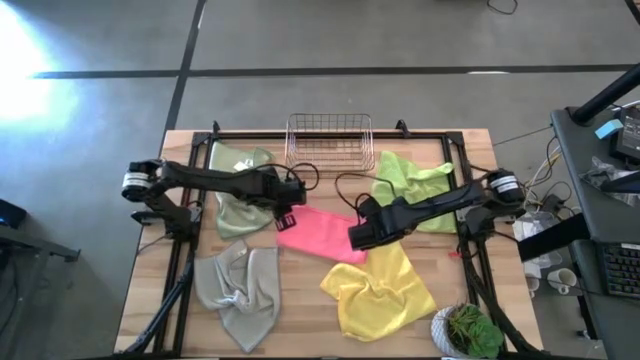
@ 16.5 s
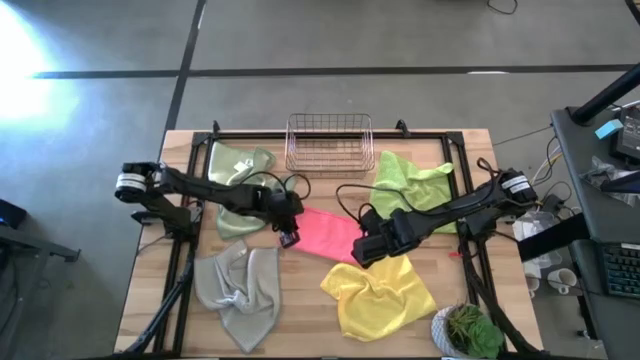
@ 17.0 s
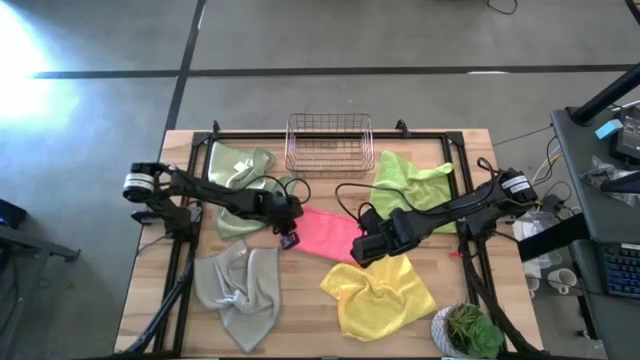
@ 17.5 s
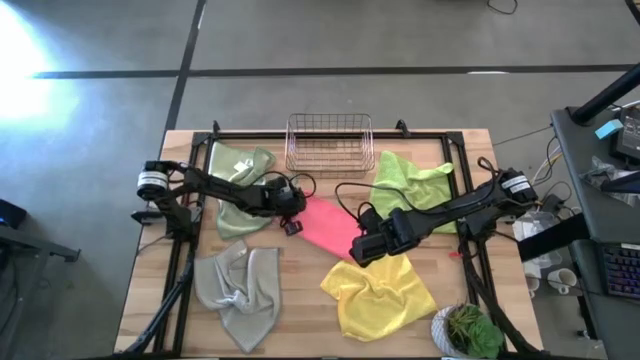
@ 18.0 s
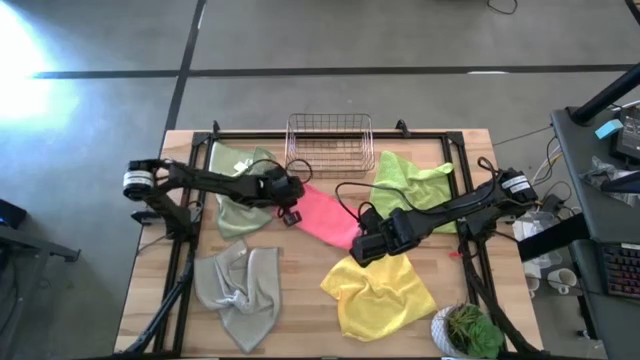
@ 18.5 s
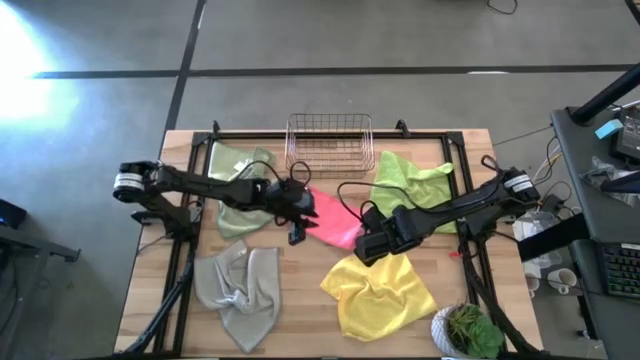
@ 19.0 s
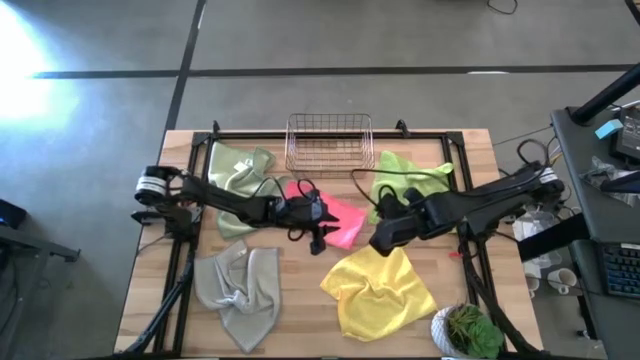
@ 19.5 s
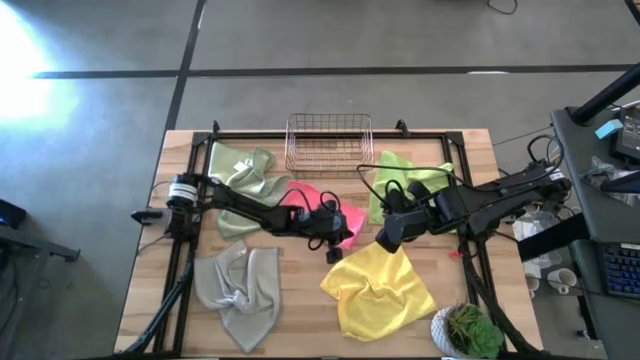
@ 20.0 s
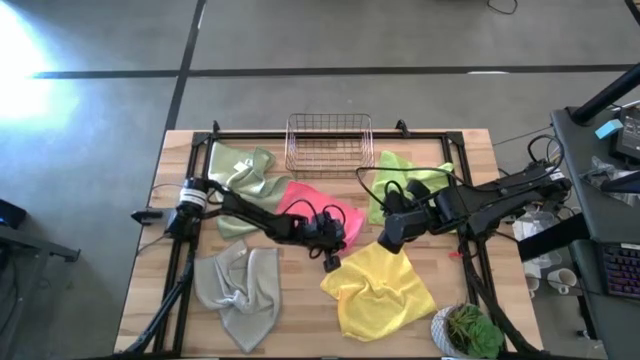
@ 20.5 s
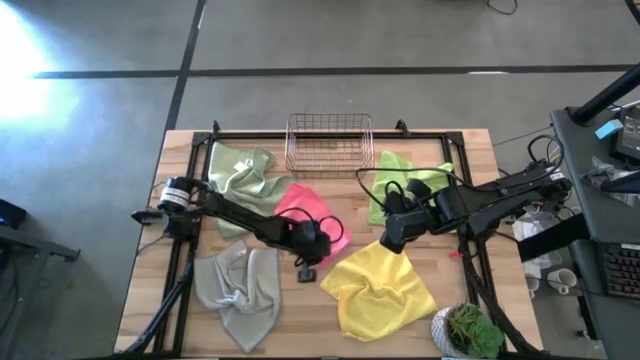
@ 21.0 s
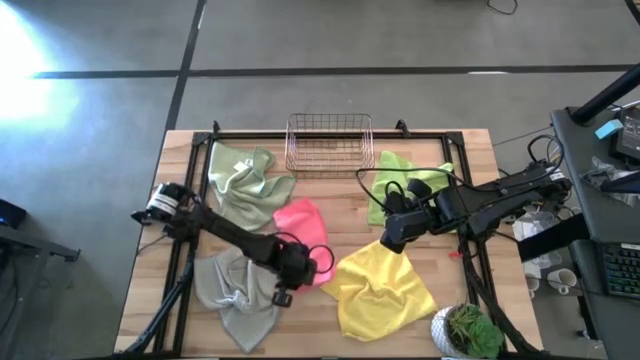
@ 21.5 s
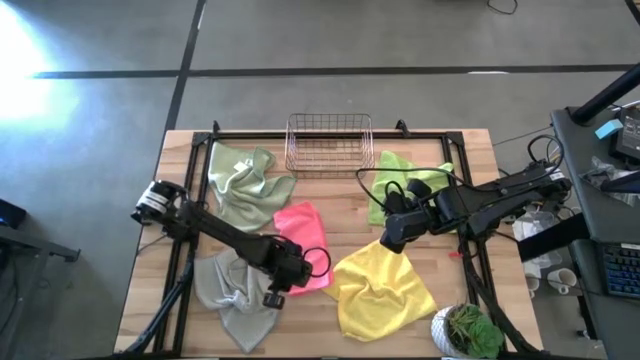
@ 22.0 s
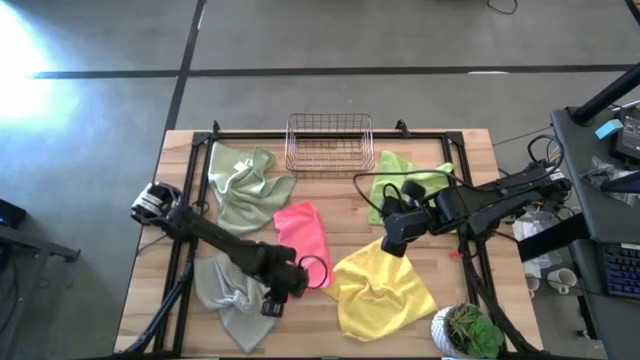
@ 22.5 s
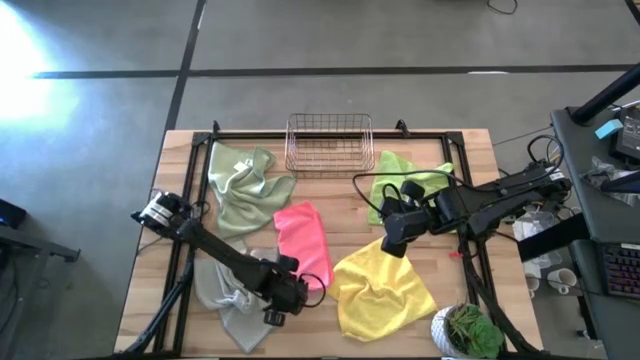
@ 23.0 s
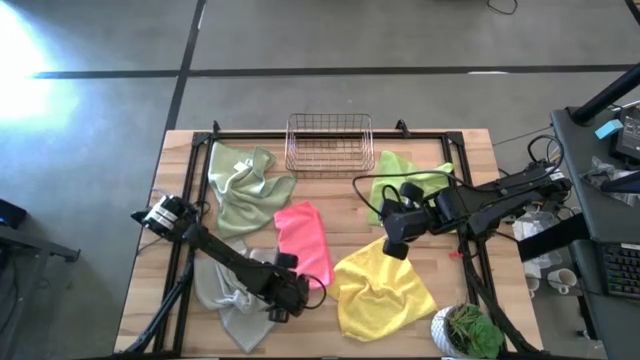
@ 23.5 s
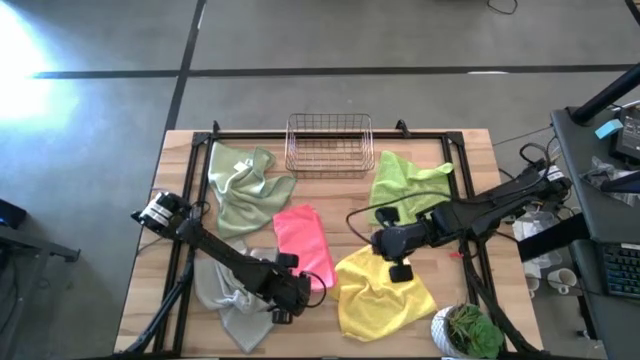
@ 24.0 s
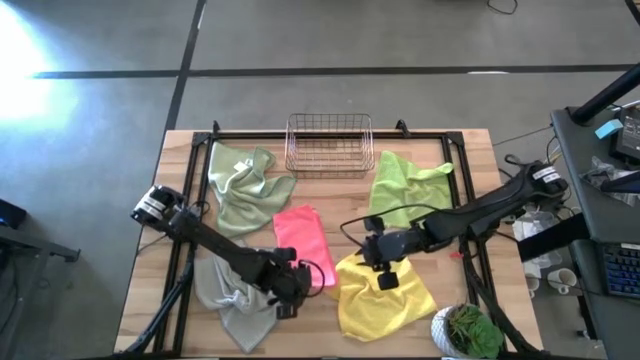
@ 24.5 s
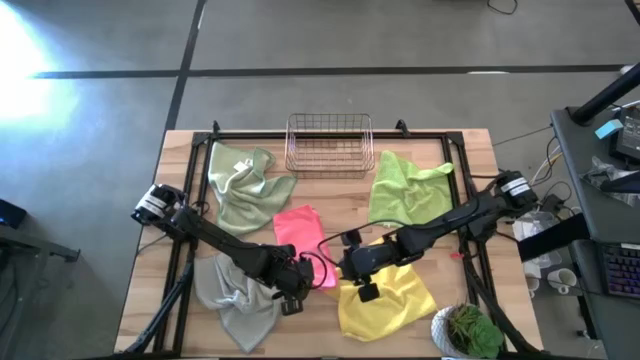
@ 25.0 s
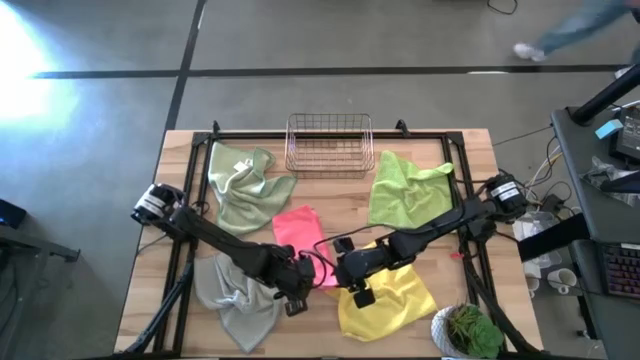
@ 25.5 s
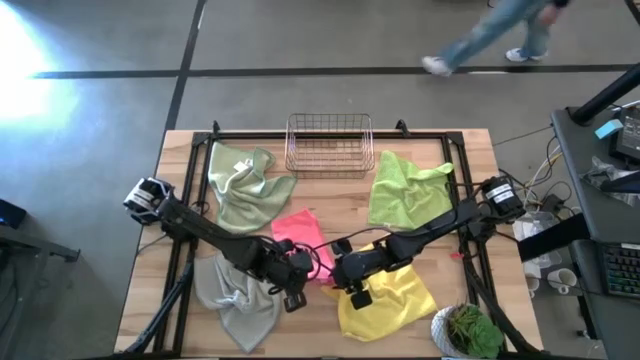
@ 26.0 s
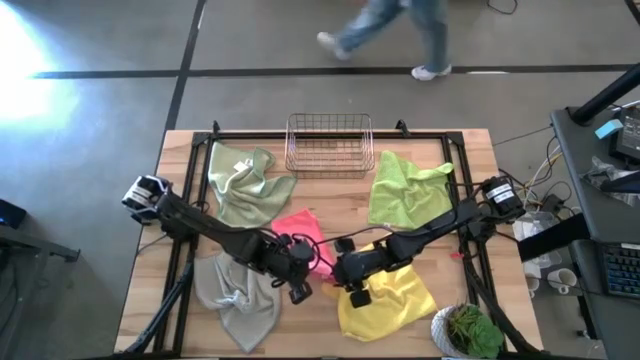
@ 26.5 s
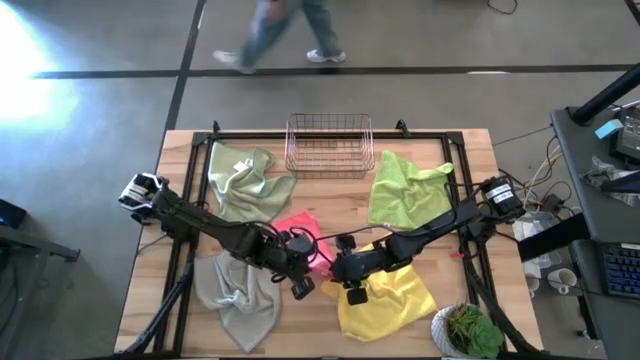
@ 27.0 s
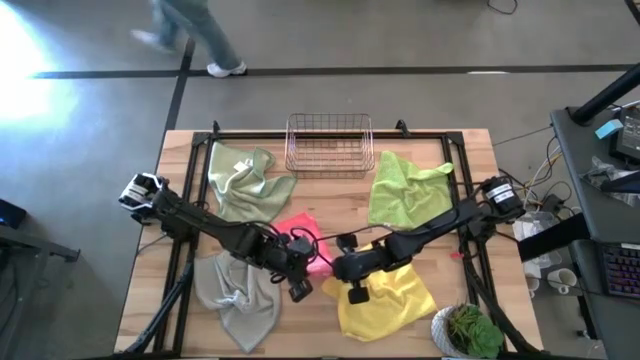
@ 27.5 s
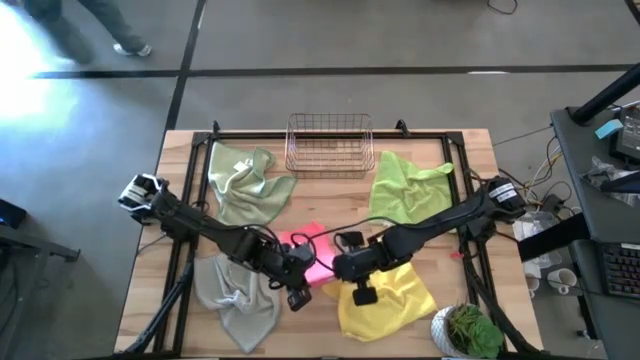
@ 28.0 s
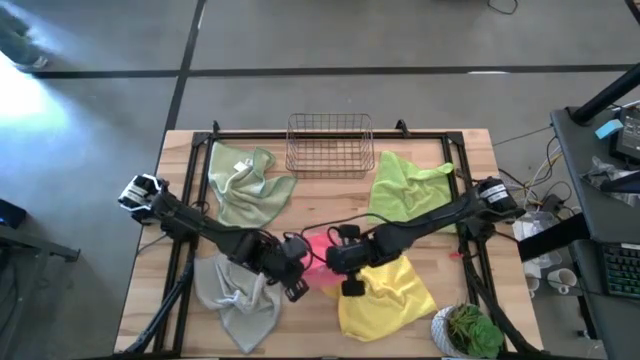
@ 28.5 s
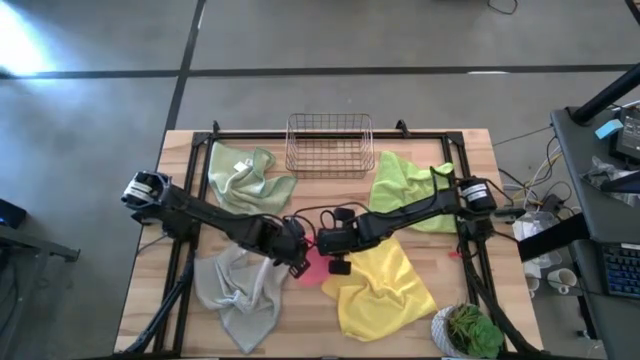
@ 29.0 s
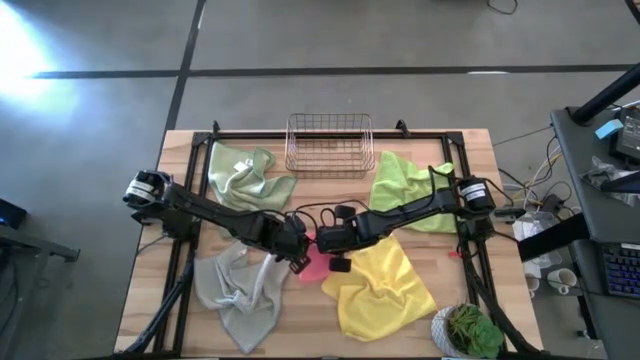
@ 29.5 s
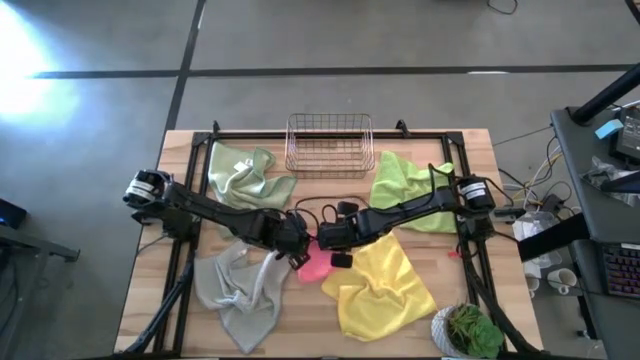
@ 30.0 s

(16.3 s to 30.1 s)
Task: Fold microfiber towels
Fold the pink microfiber cloth

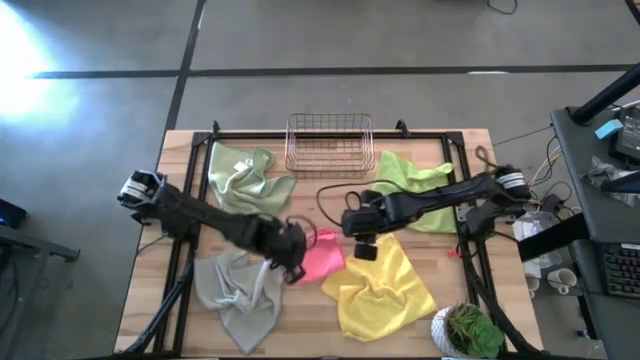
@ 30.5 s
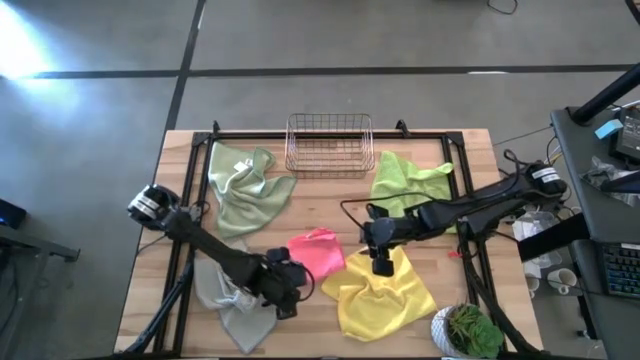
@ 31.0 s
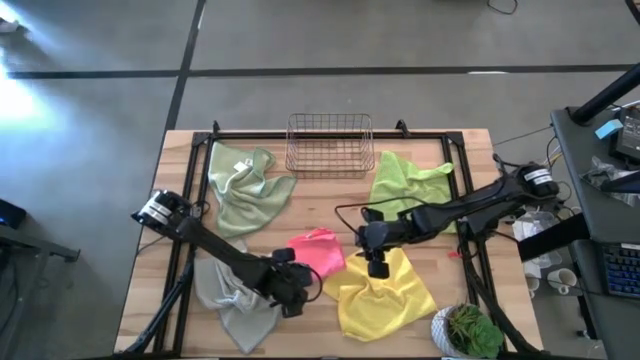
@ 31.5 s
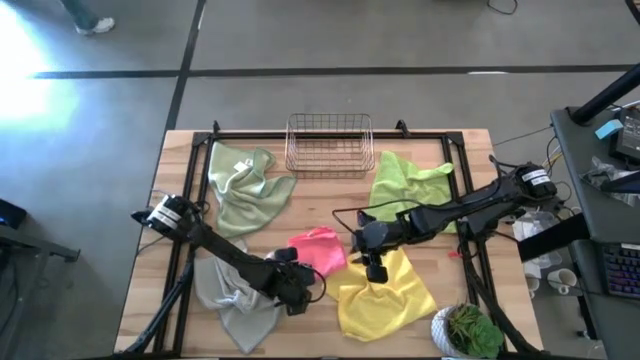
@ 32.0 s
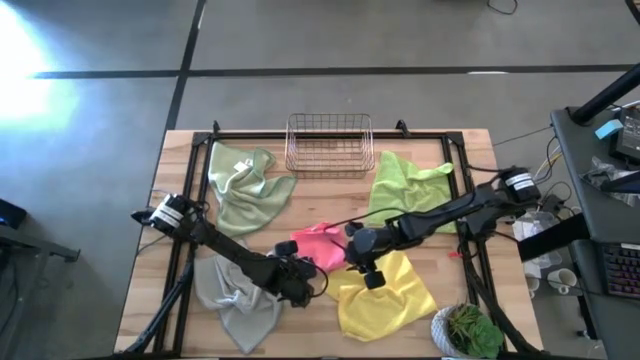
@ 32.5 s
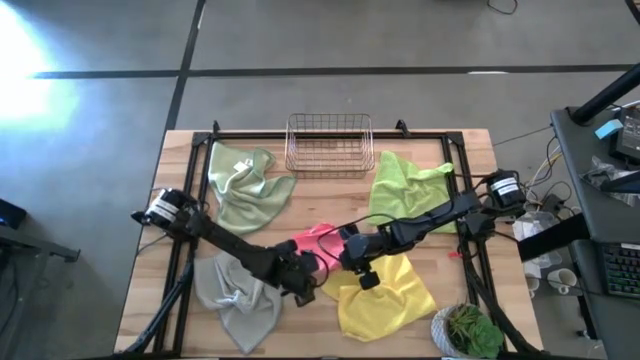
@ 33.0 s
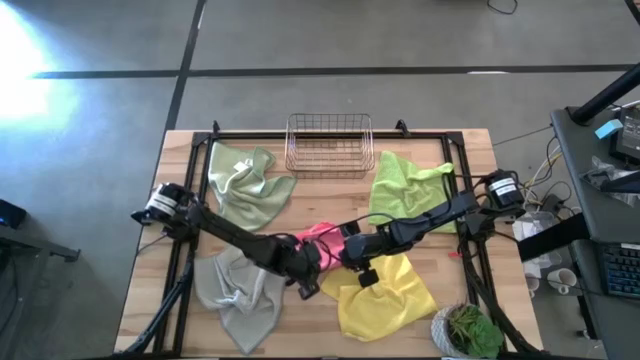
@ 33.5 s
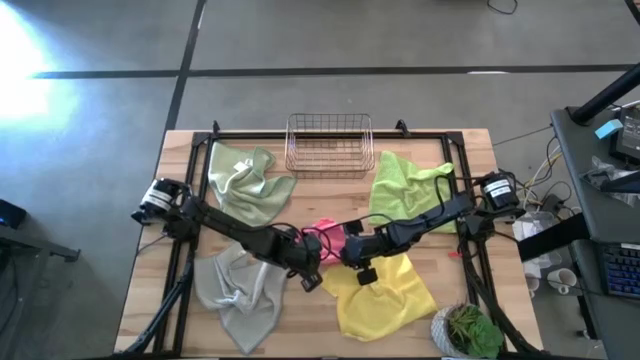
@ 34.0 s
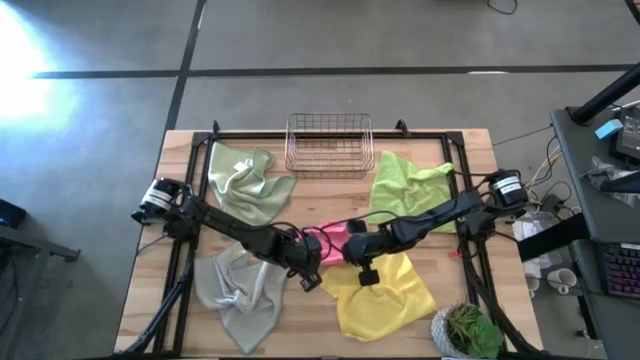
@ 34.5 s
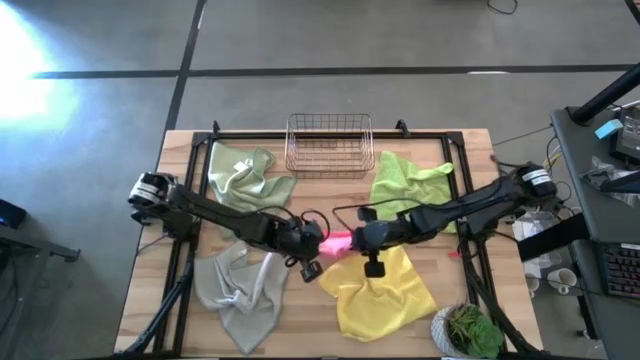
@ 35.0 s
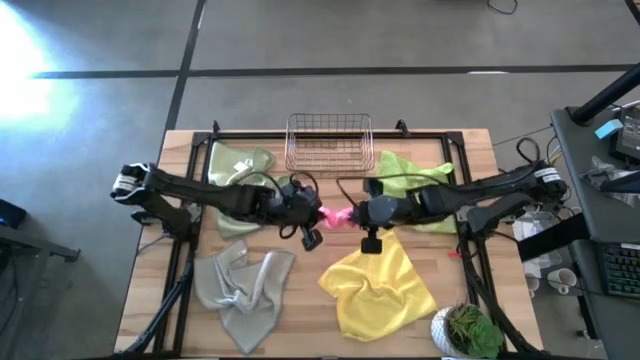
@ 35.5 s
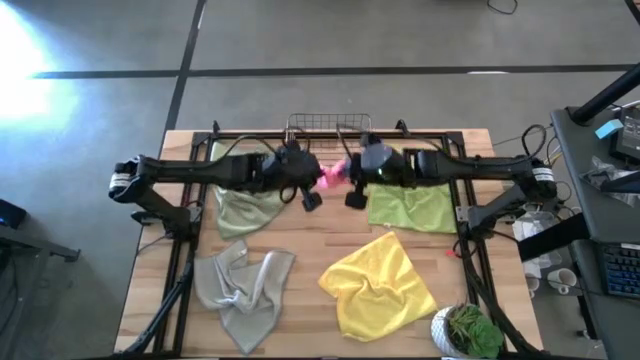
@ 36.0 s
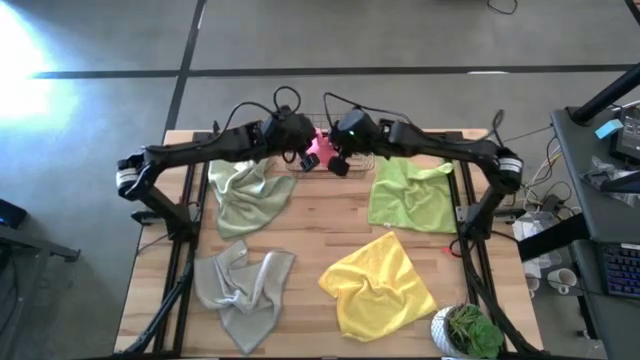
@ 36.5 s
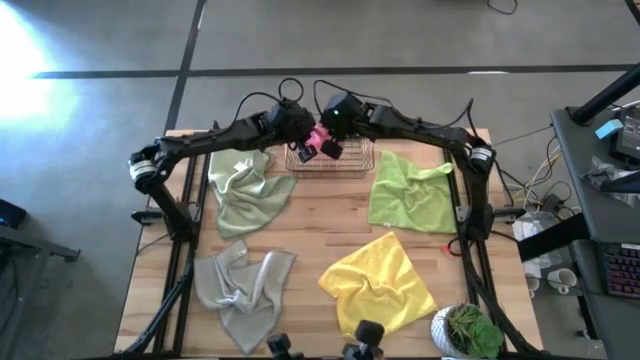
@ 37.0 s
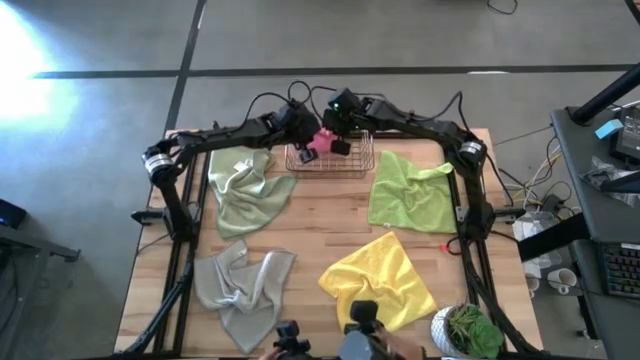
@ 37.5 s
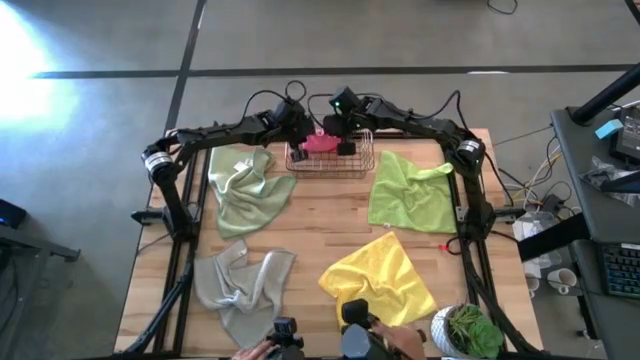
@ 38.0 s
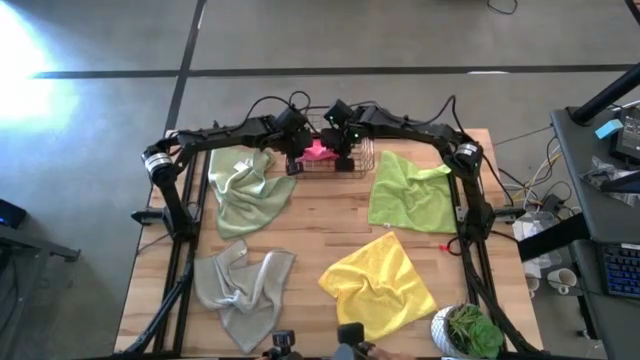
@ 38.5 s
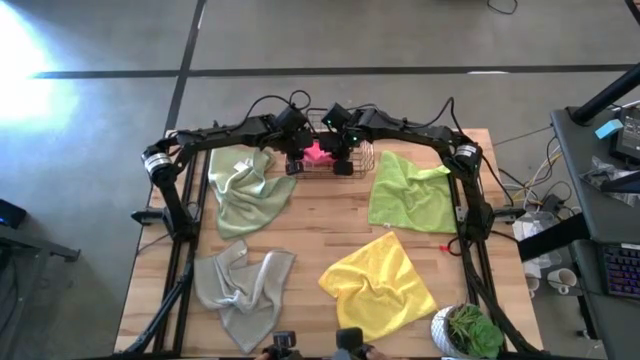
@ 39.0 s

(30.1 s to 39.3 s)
Put the folded pink microfiber cloth into the wire basket
